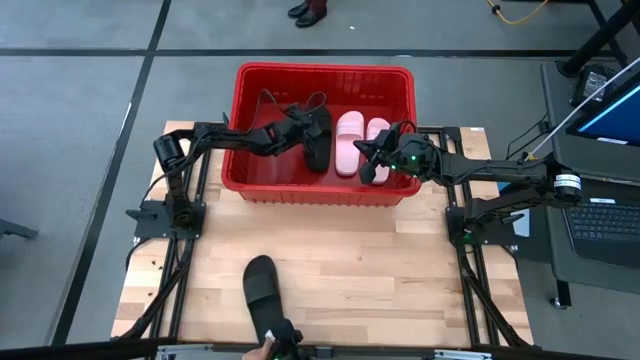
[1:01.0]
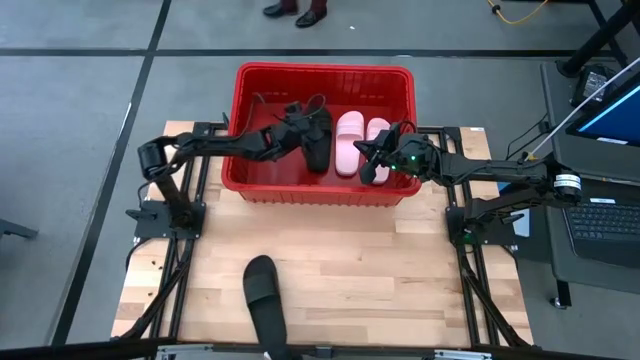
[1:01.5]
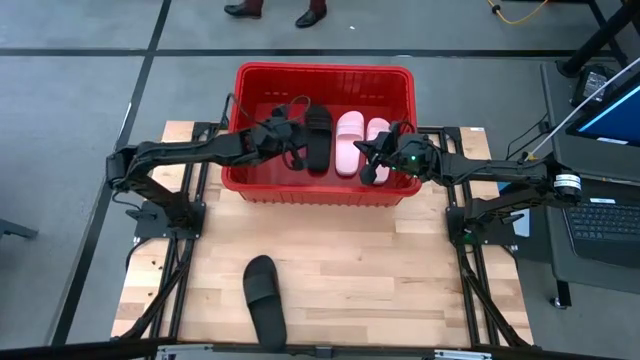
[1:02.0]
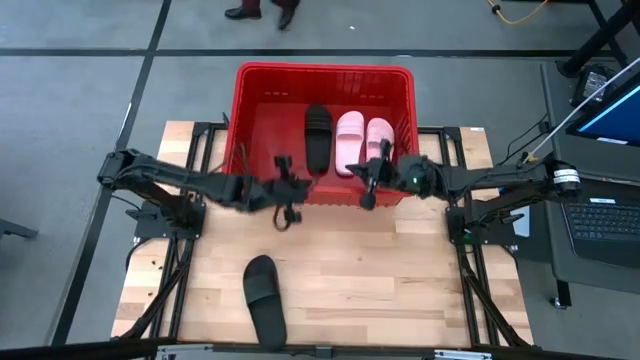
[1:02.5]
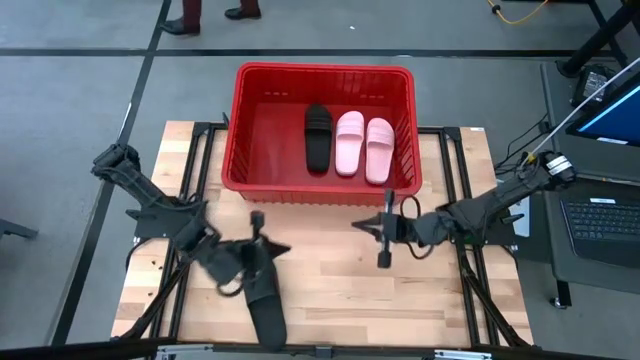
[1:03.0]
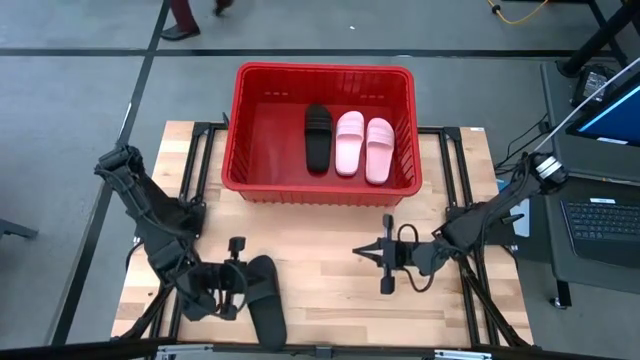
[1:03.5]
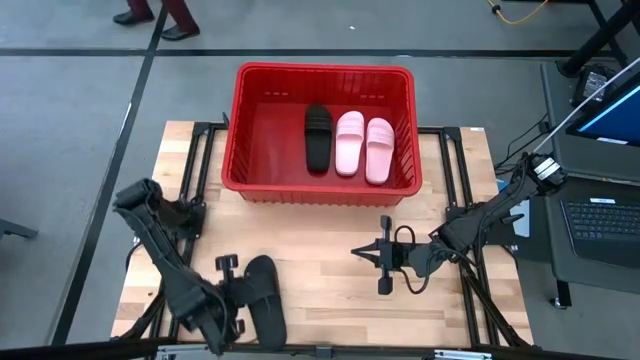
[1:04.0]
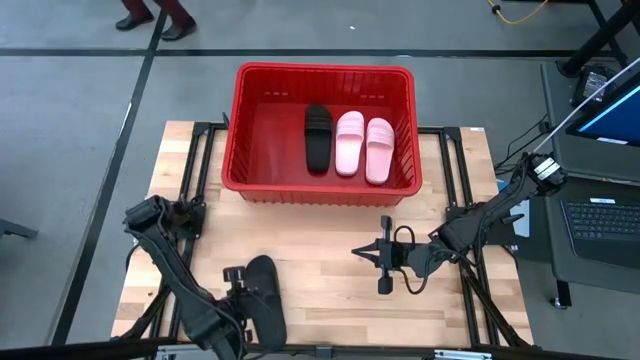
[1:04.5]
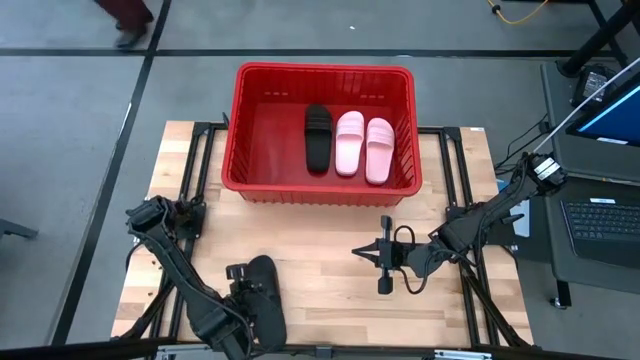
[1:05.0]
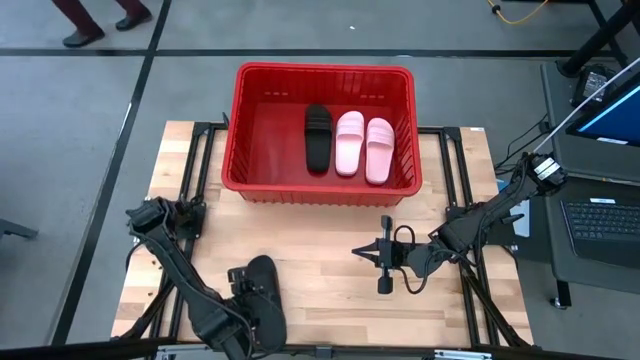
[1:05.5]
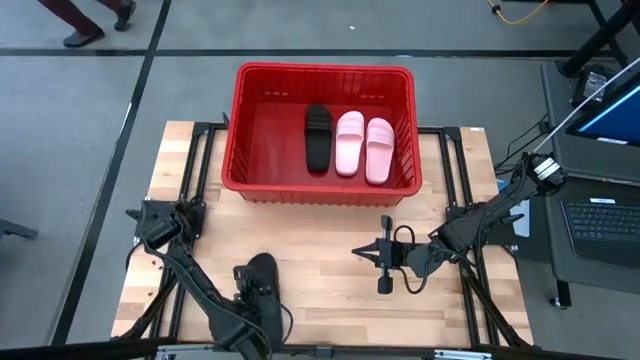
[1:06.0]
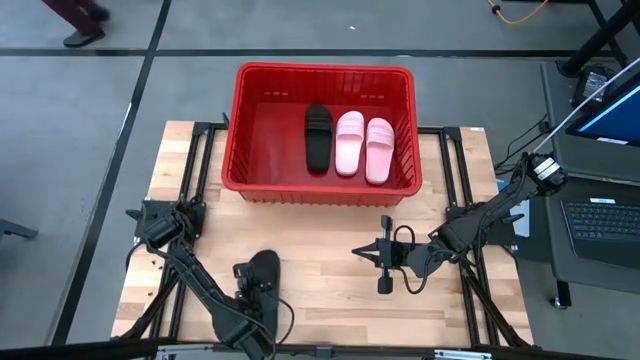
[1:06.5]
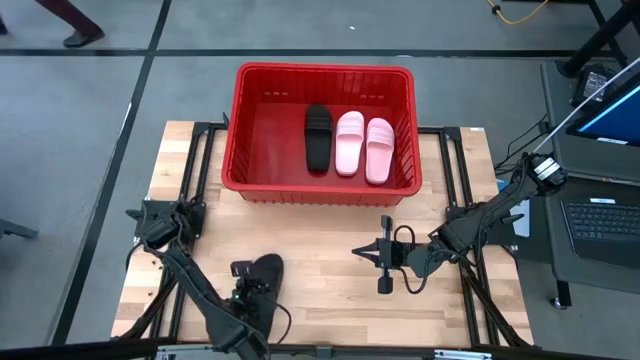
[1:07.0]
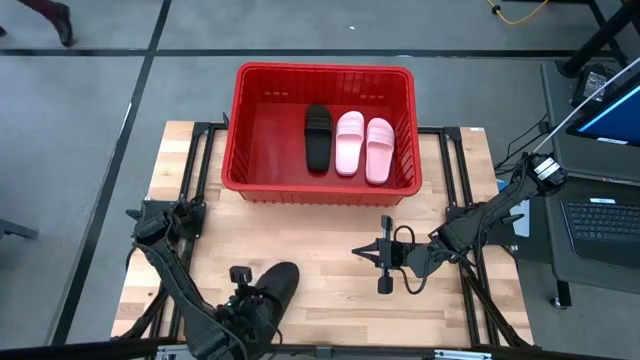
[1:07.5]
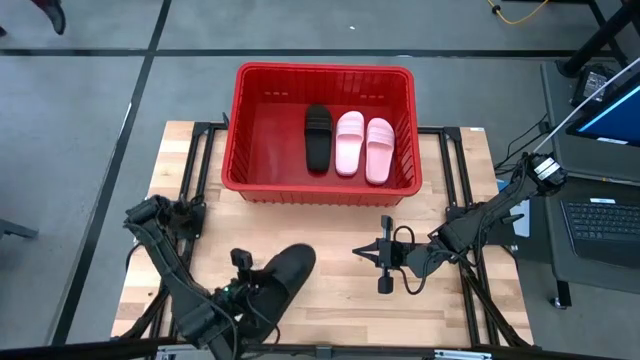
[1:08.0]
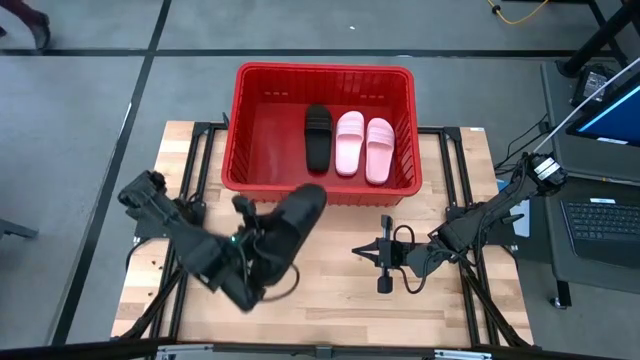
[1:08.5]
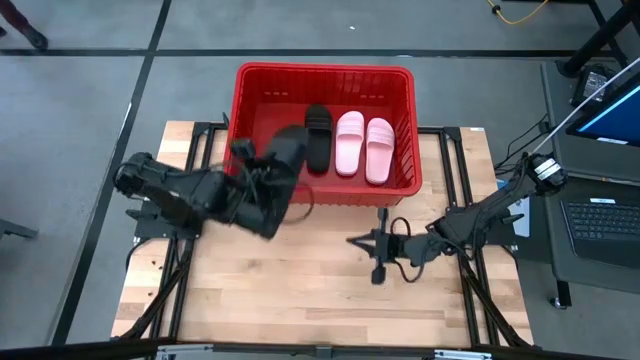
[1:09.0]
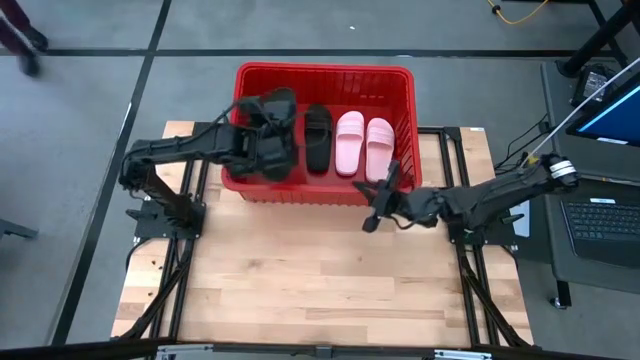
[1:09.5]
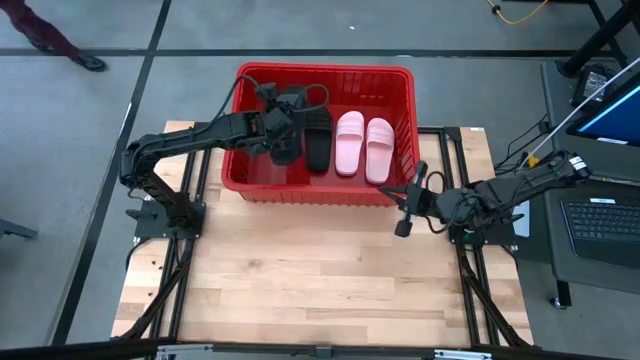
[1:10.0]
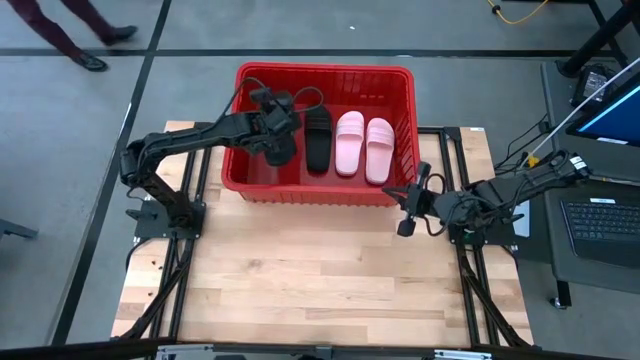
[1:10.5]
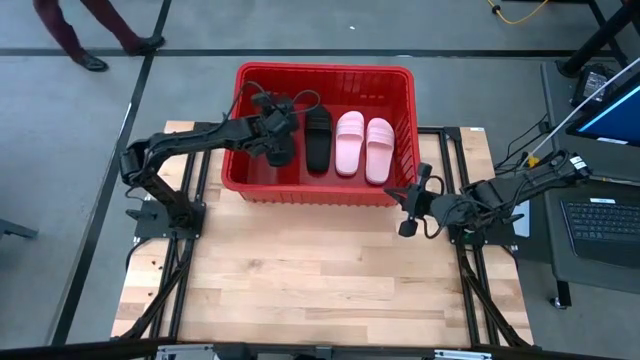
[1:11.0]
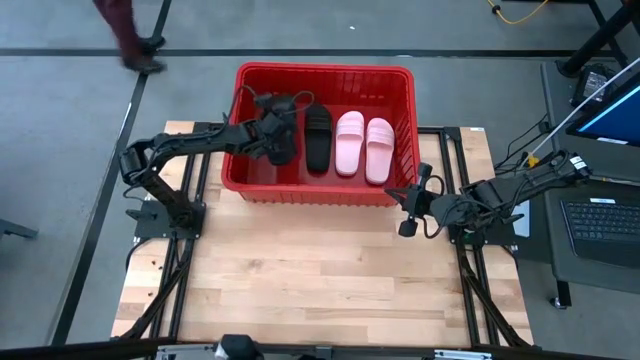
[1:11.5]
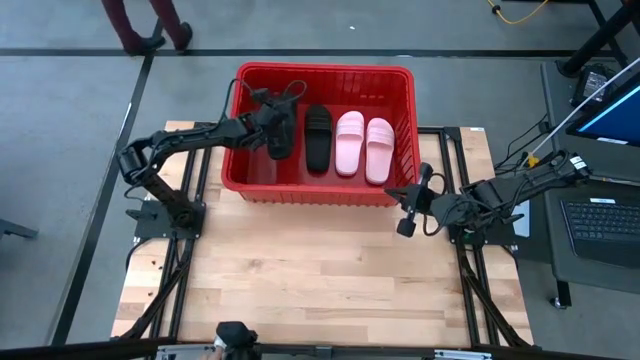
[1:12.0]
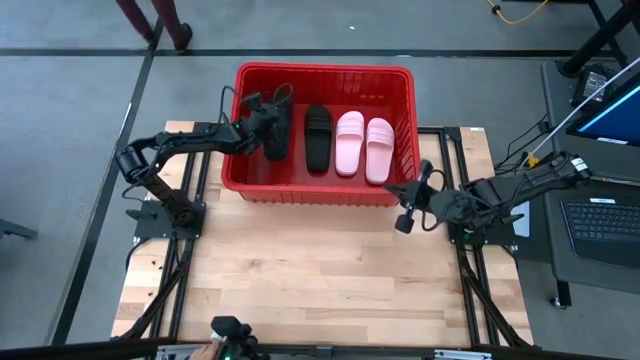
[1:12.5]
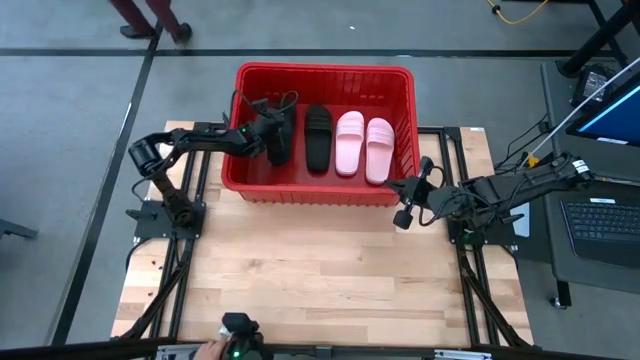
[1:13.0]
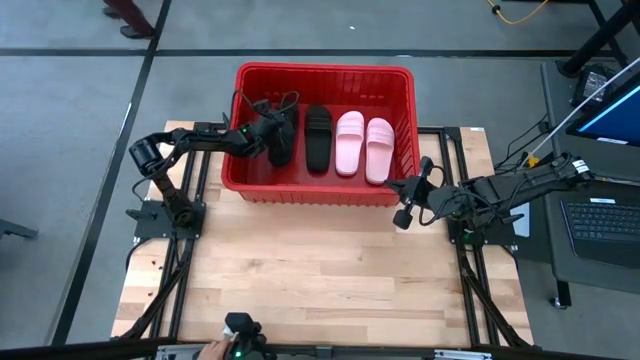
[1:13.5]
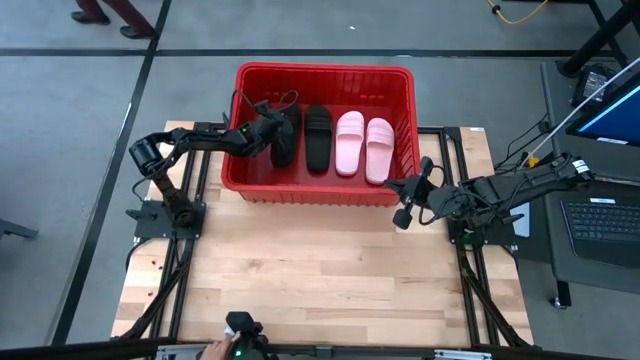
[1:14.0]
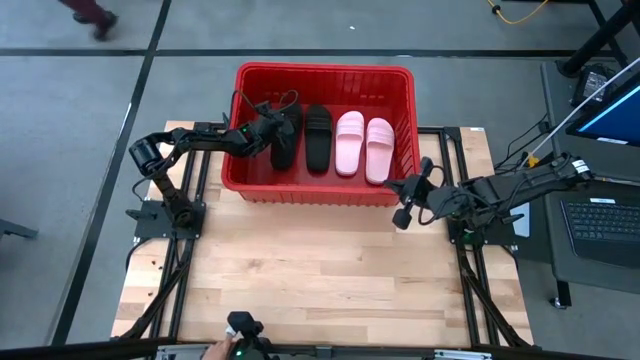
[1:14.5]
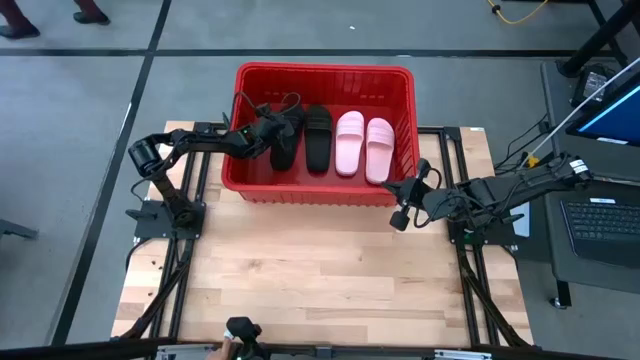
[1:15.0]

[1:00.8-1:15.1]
Task: Pick and place slides into bin
Put the black slide into the red container

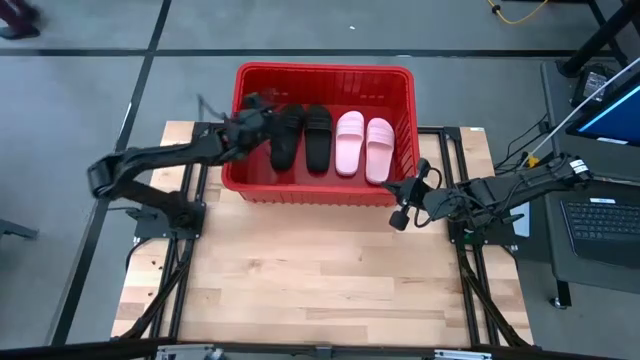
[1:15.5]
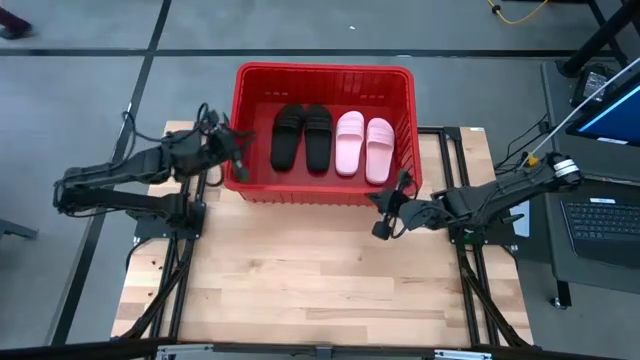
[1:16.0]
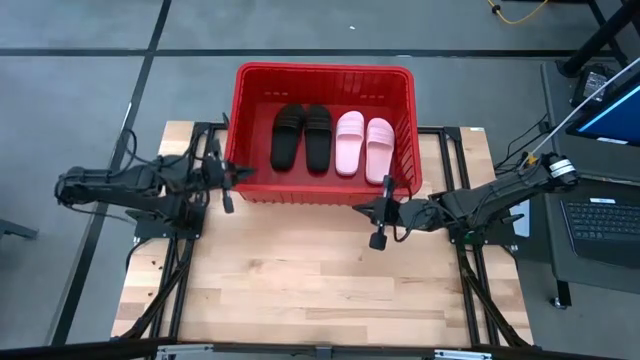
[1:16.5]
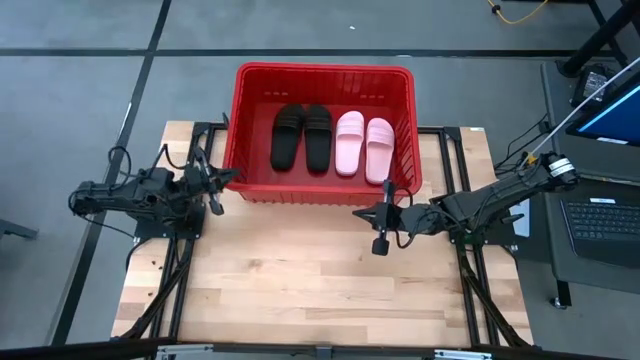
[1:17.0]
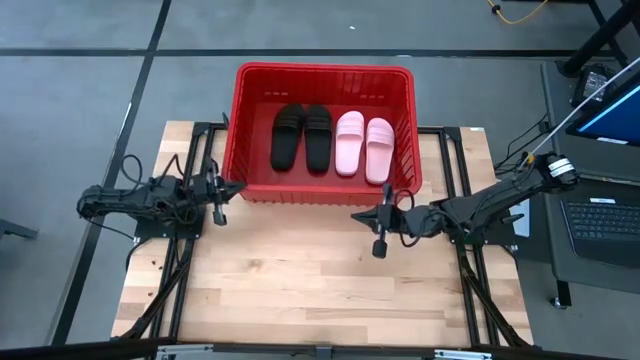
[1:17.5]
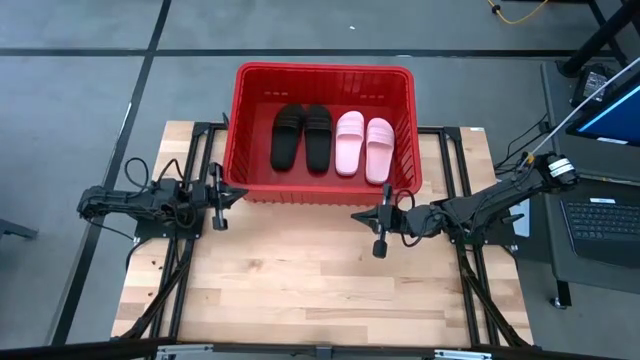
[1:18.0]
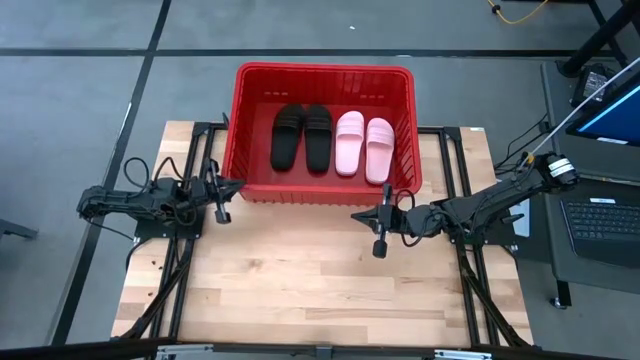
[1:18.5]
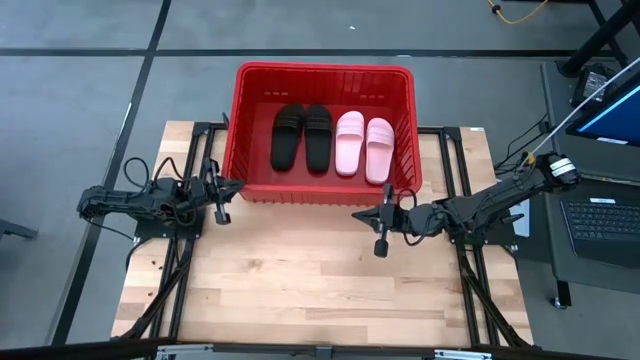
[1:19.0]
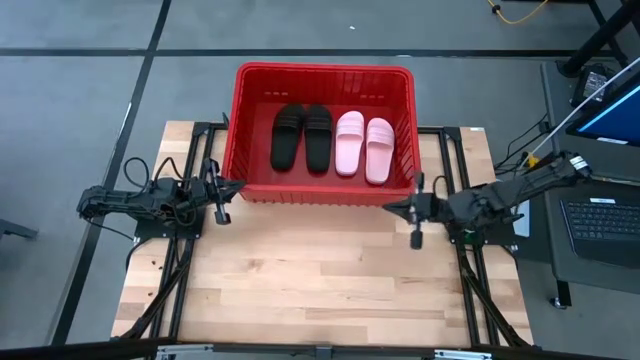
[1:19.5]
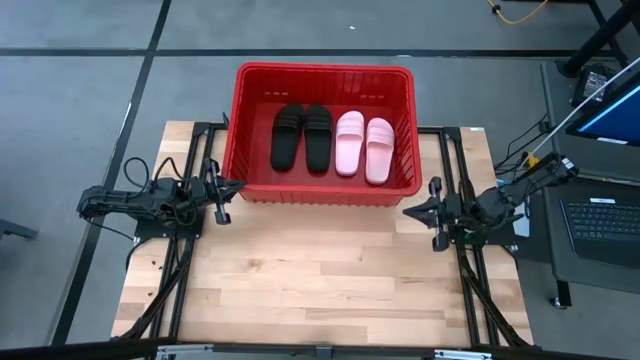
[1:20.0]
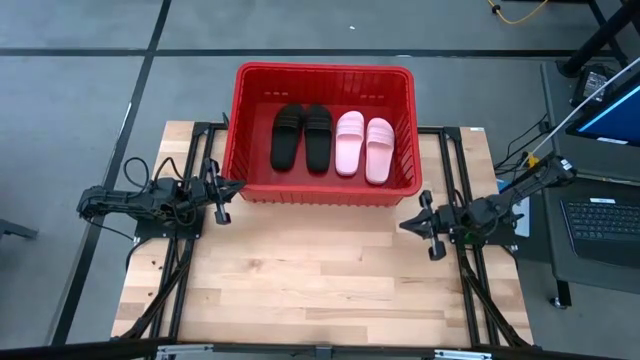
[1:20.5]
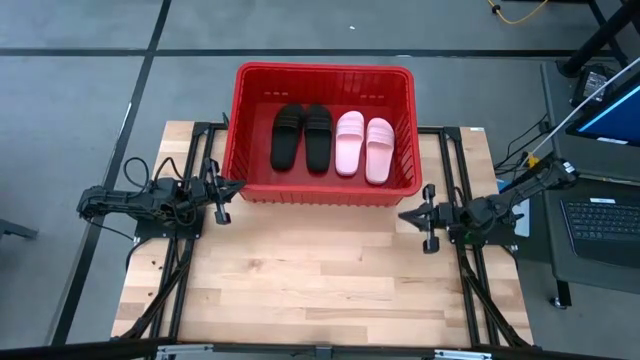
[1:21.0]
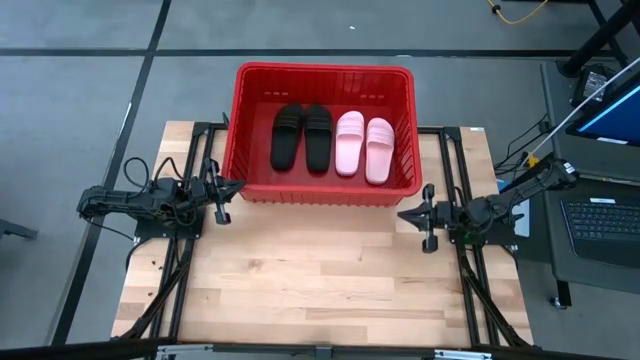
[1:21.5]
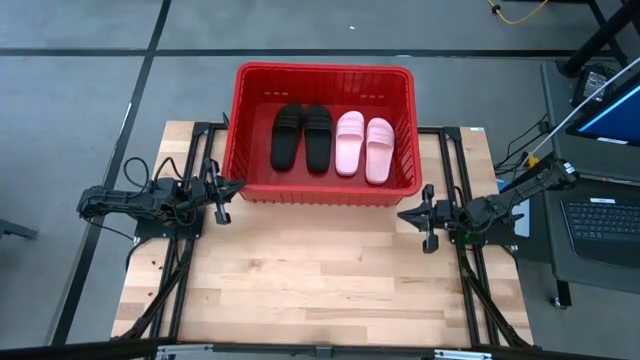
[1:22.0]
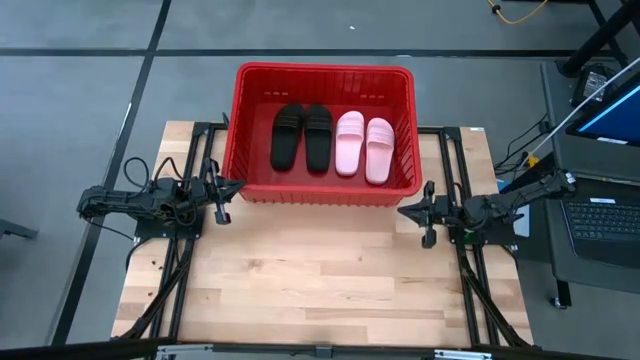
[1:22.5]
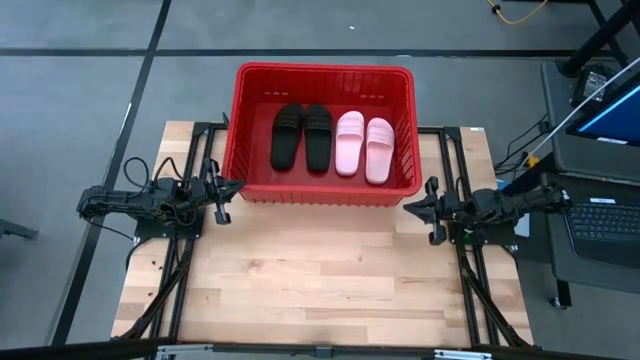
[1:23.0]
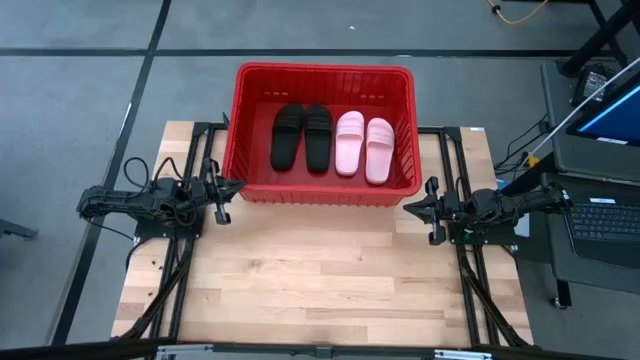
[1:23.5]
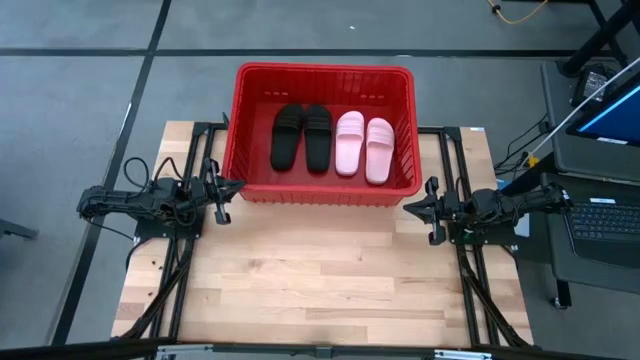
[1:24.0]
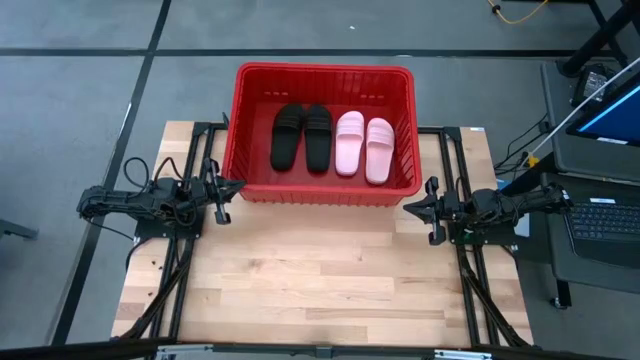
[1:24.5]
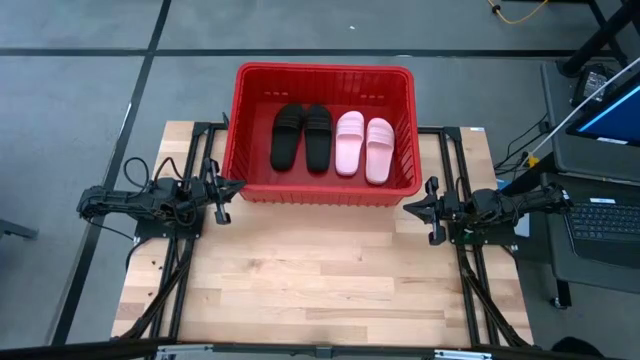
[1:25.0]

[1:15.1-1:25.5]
Return to Home Position
